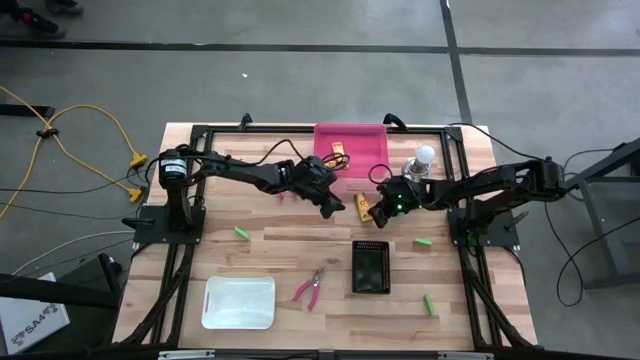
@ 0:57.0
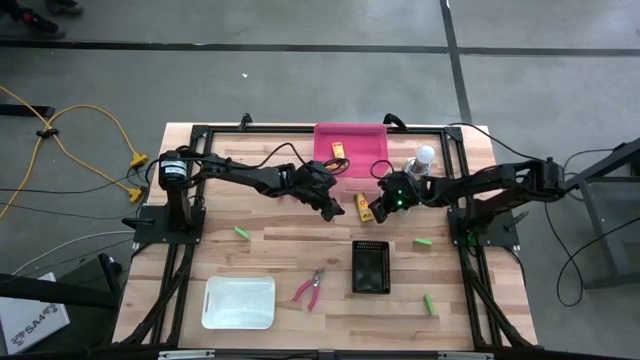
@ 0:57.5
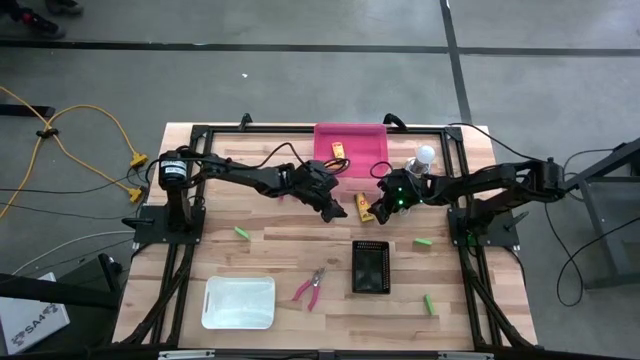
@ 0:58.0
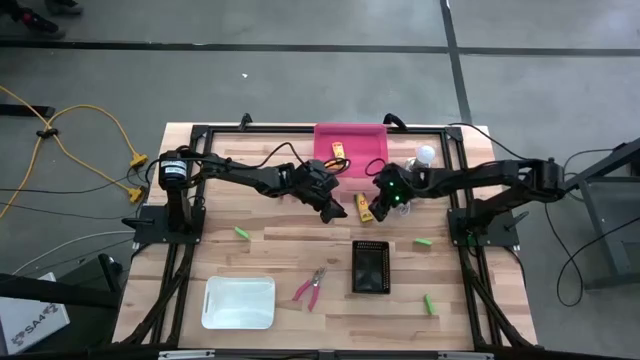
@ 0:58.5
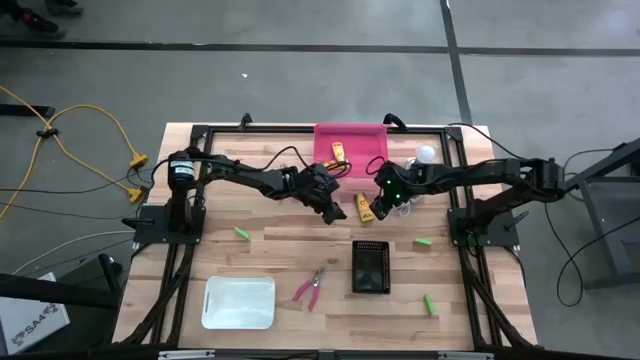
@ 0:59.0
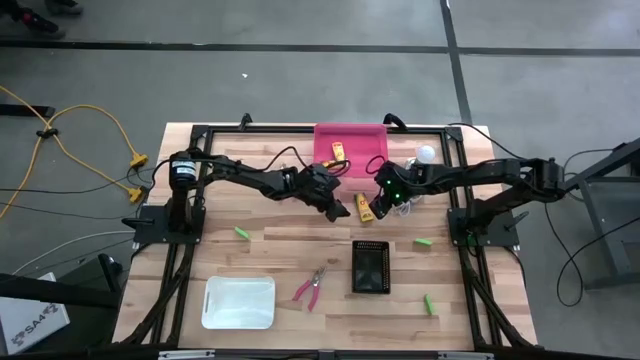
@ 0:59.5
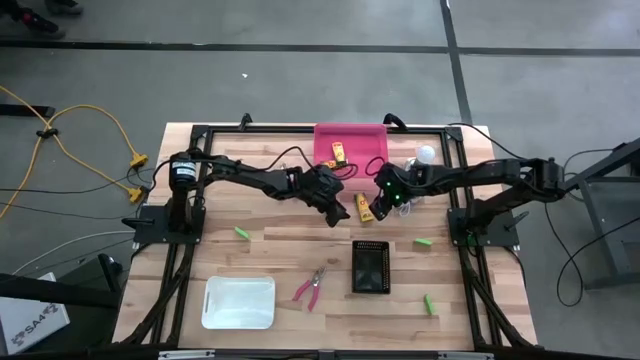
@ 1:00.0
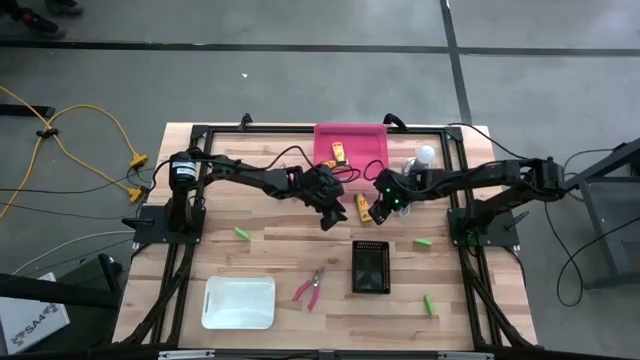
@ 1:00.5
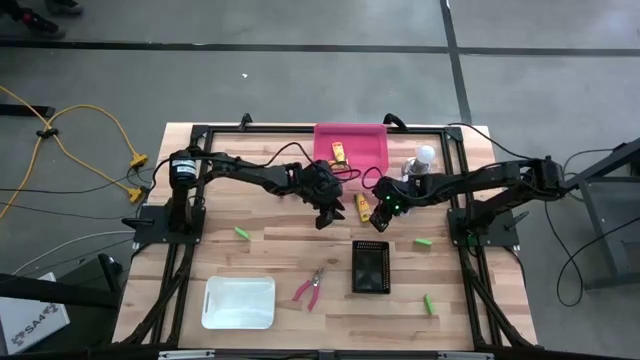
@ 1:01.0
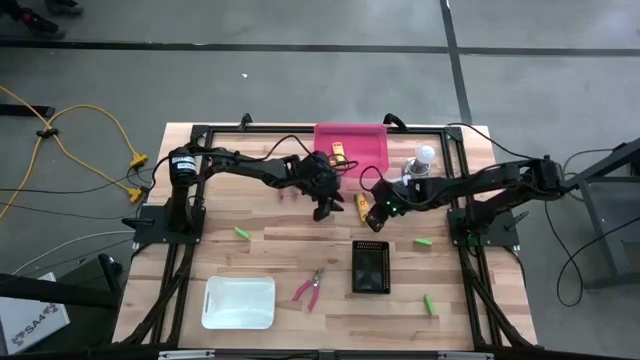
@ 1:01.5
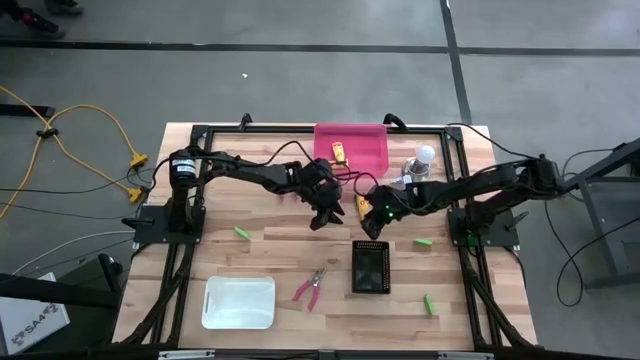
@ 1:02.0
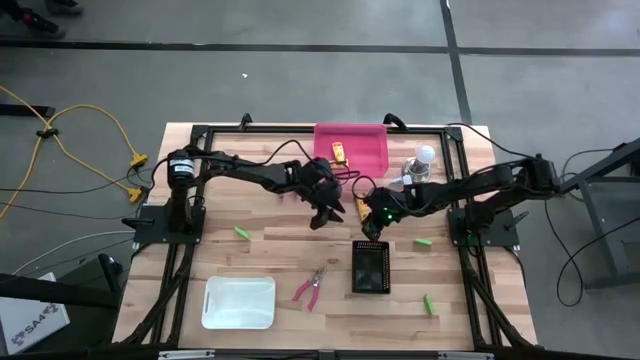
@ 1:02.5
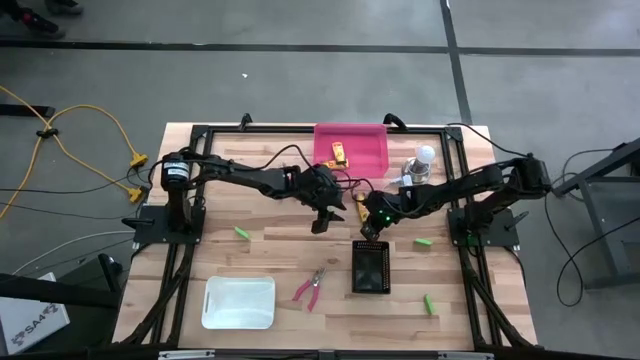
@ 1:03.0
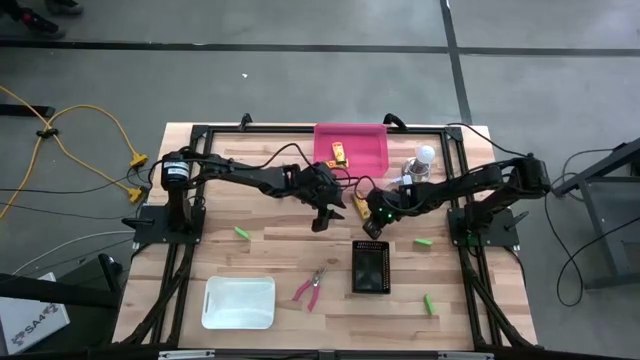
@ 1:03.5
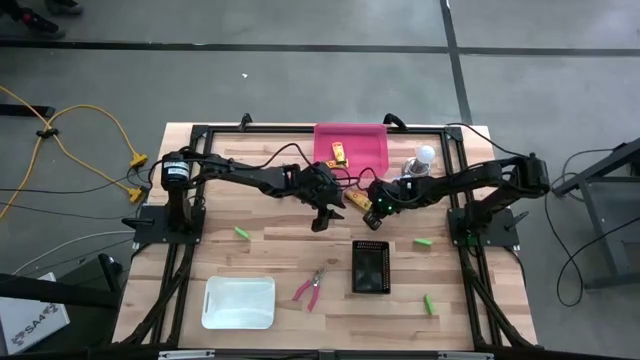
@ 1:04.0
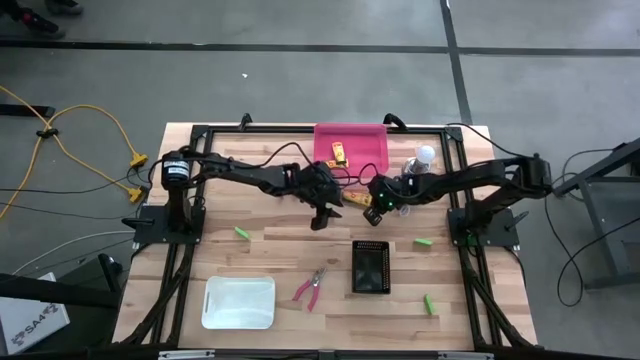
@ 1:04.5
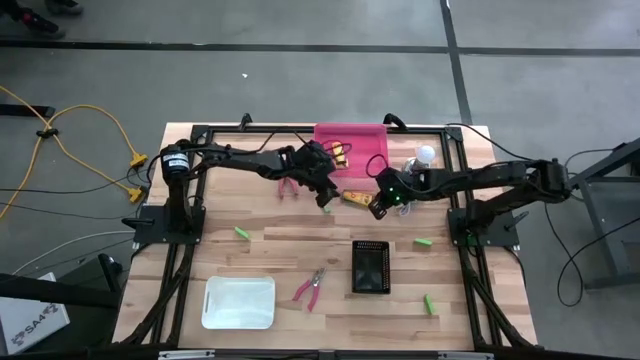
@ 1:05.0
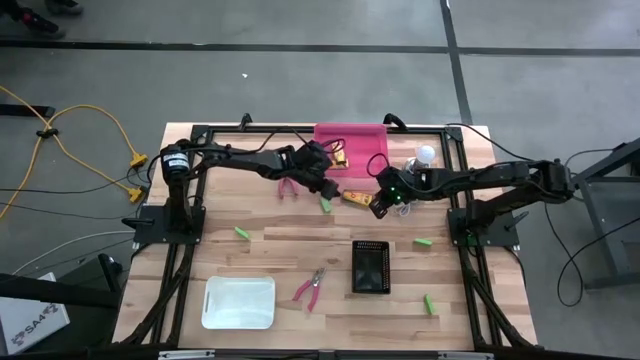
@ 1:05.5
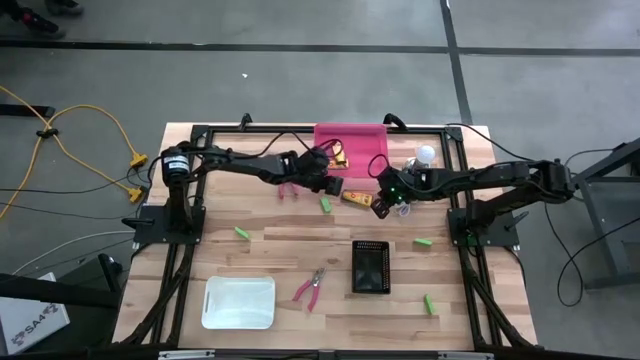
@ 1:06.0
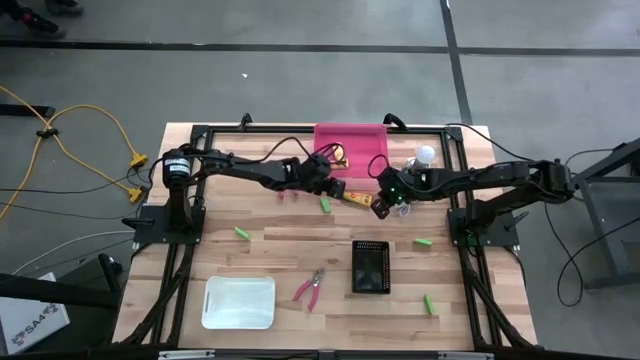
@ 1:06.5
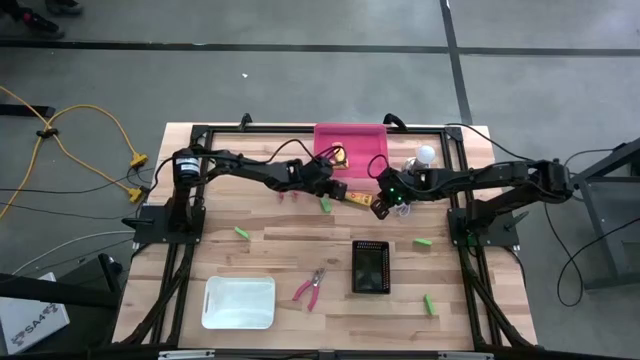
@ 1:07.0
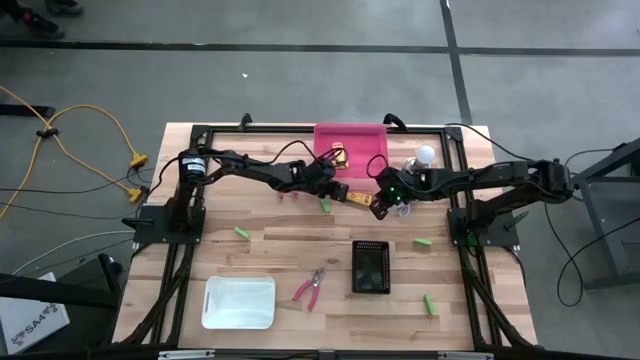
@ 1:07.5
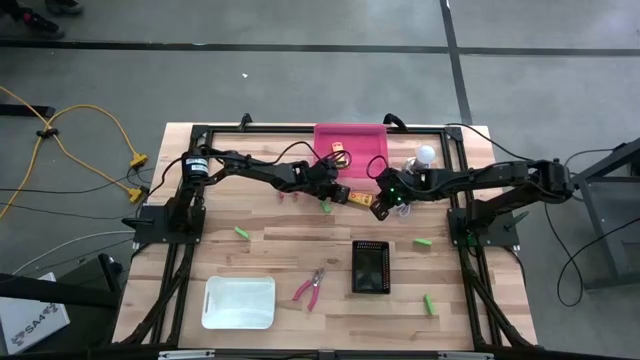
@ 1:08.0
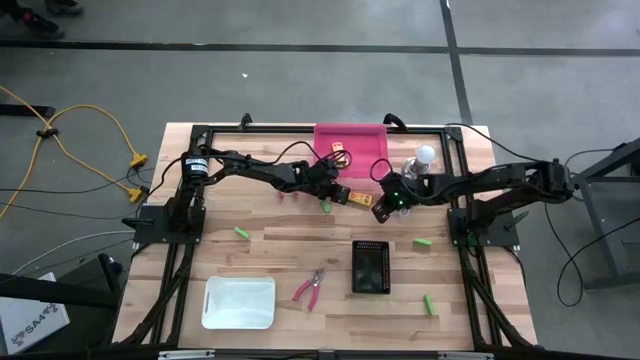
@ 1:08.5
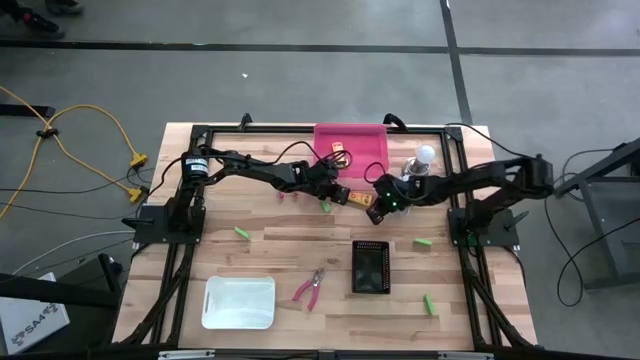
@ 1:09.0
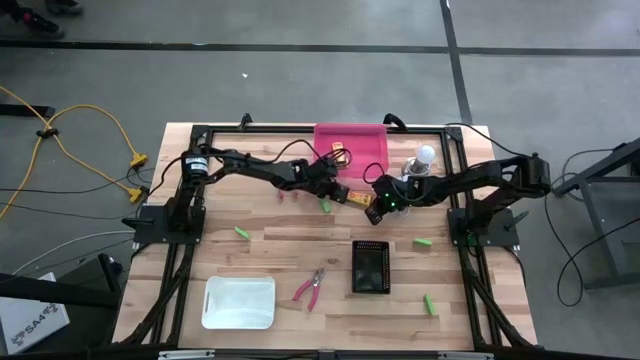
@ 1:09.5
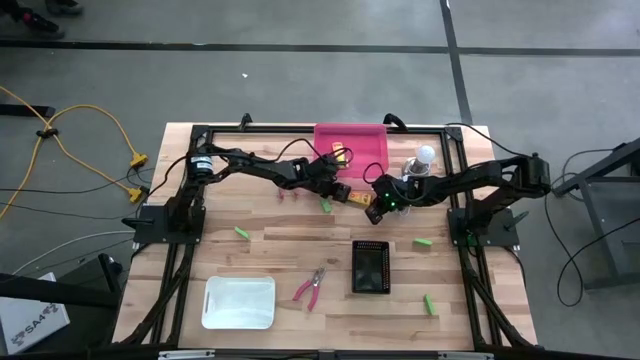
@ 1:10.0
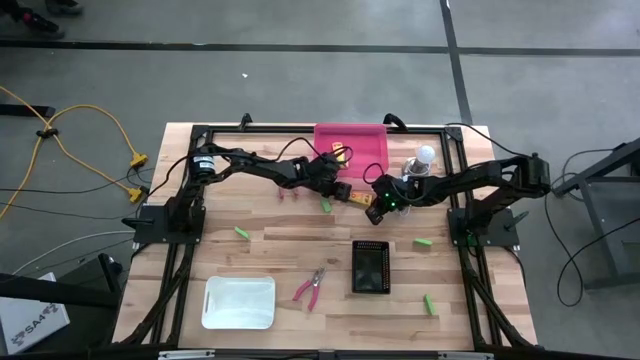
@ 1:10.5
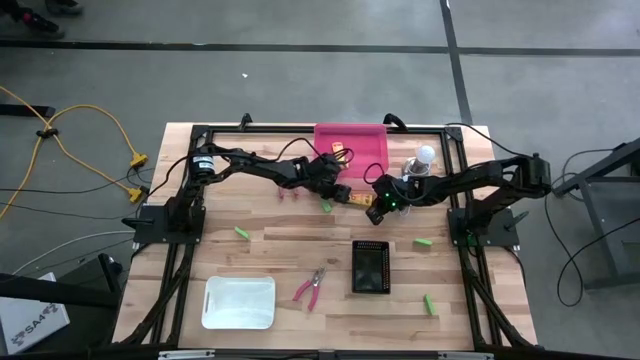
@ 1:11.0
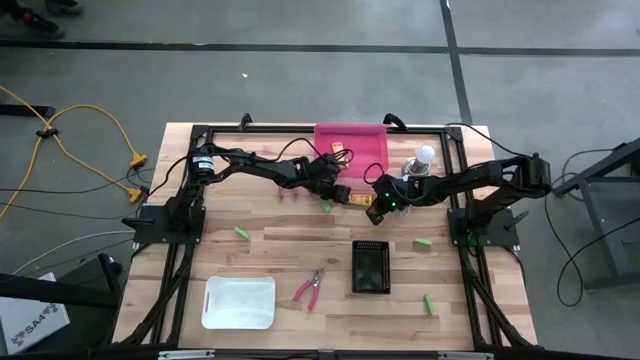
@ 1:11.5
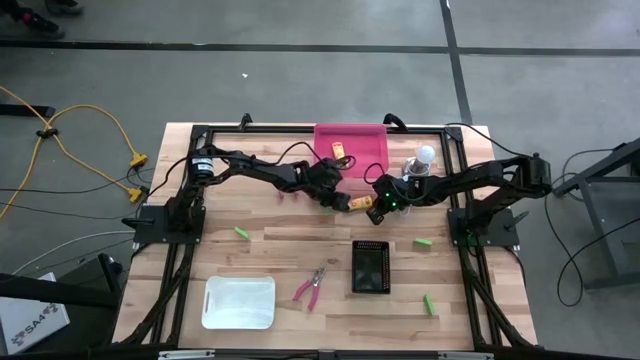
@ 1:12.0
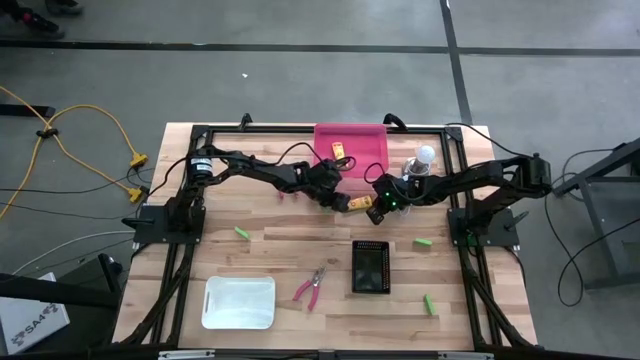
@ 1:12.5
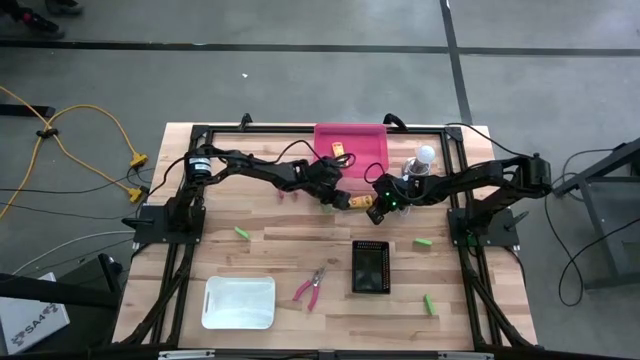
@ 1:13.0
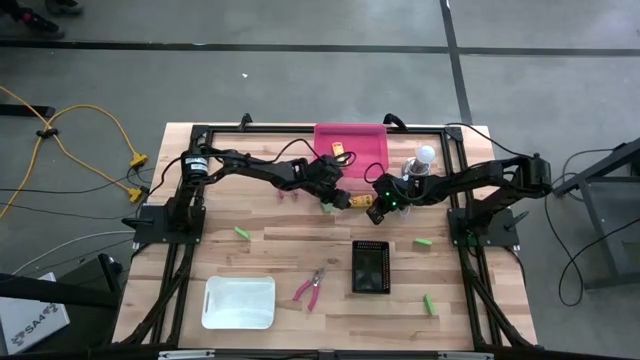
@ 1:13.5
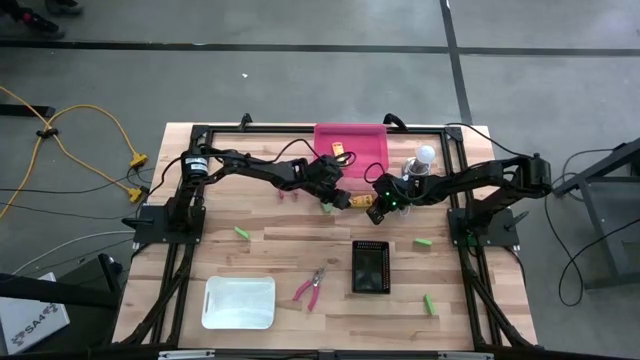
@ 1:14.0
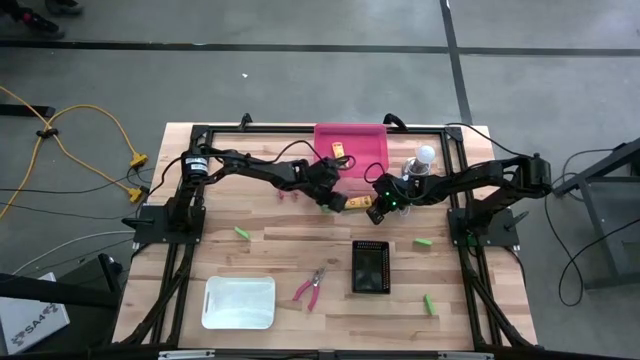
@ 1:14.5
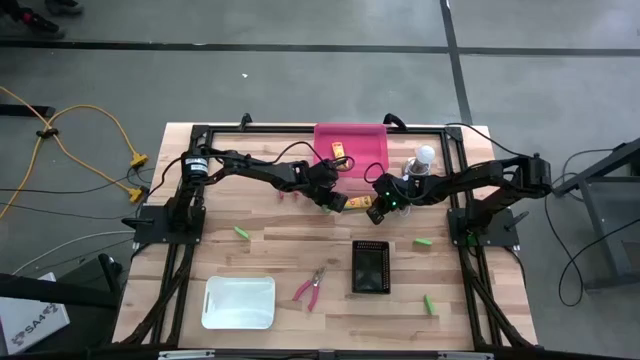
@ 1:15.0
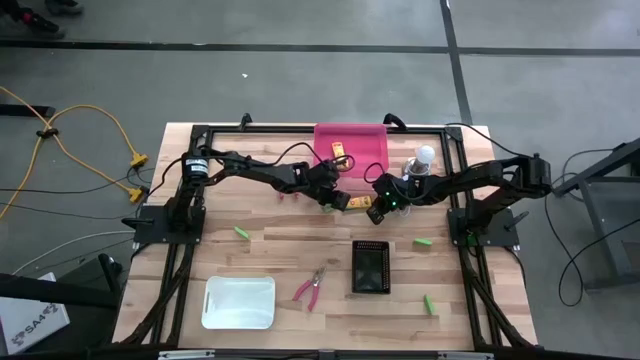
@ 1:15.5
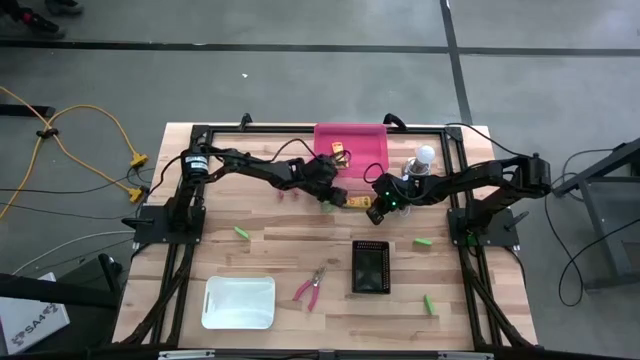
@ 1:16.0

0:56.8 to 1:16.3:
Task: Pick & Place School Supplies
Put the yellow crayon box into the pink bin

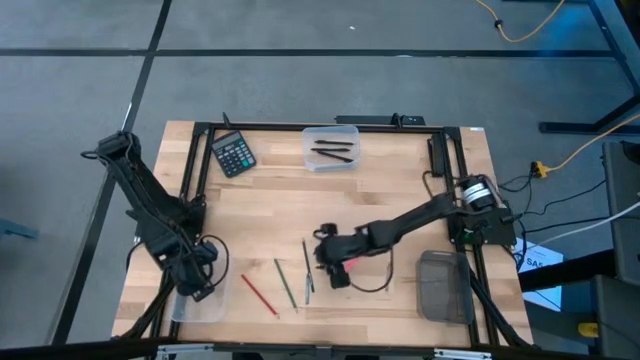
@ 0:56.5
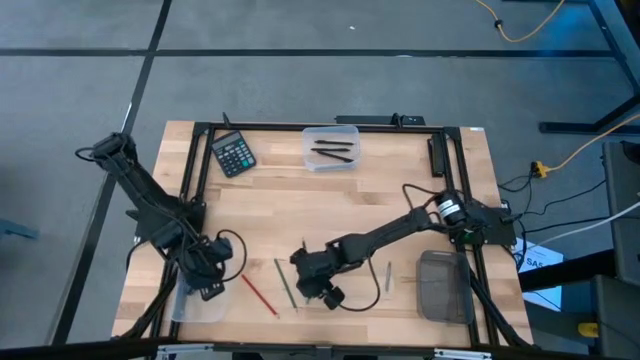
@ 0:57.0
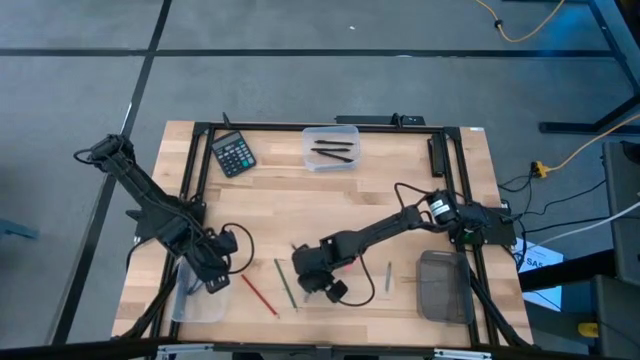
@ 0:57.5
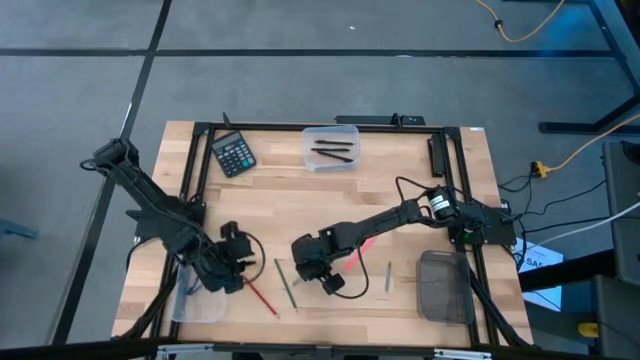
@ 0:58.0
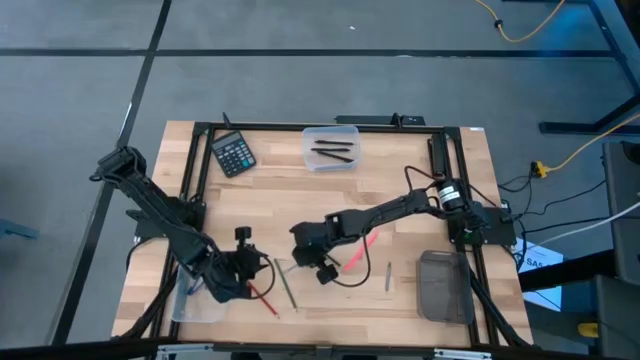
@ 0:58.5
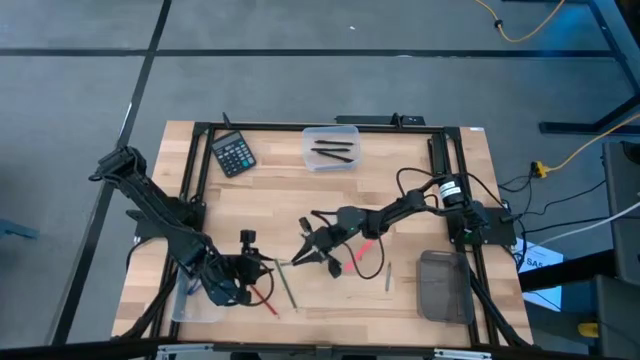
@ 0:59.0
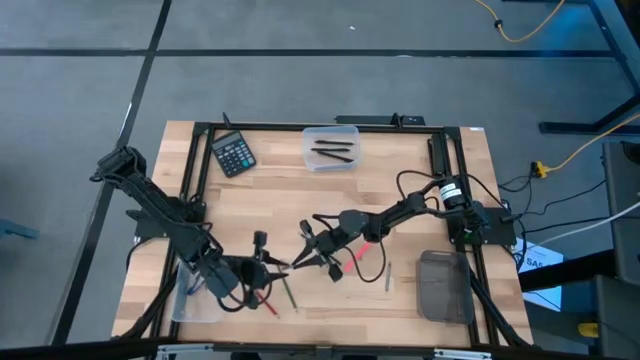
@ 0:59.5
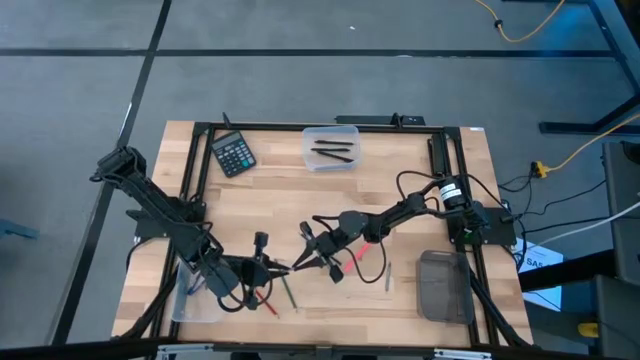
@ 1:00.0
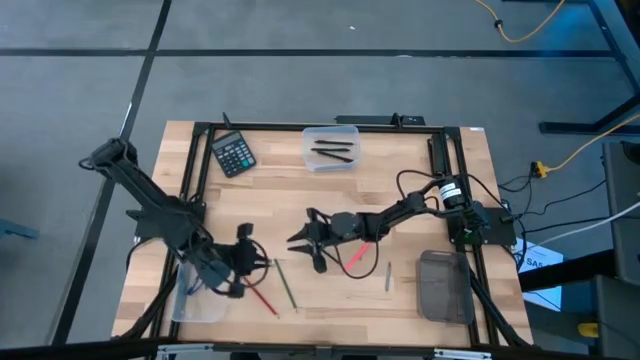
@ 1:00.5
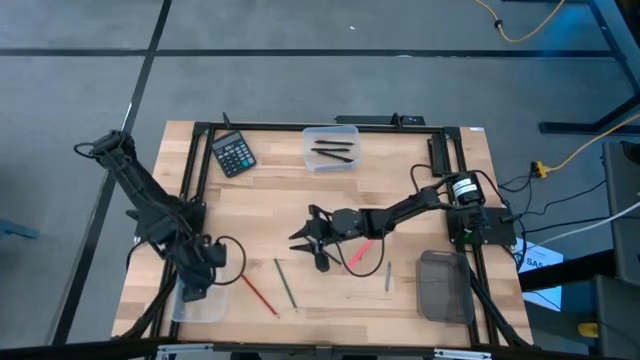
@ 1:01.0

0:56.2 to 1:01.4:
Task: Sort crayons/erasers/pens/pencils in bins
Put the left gray crayon into the bottom transparent bin
